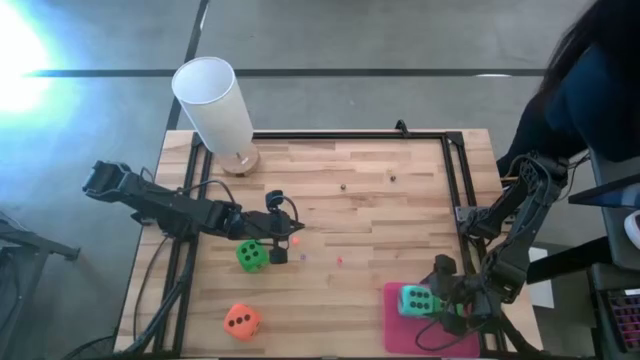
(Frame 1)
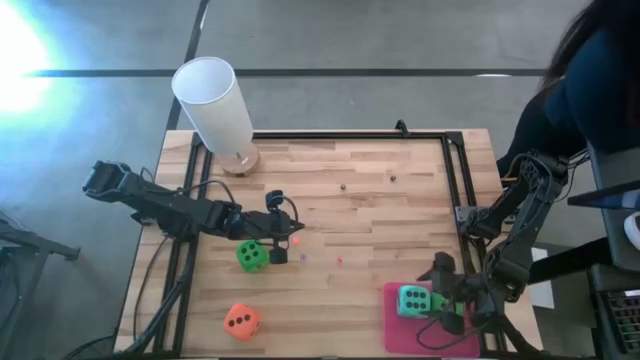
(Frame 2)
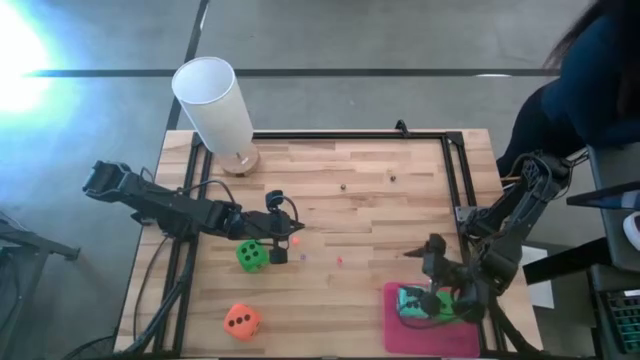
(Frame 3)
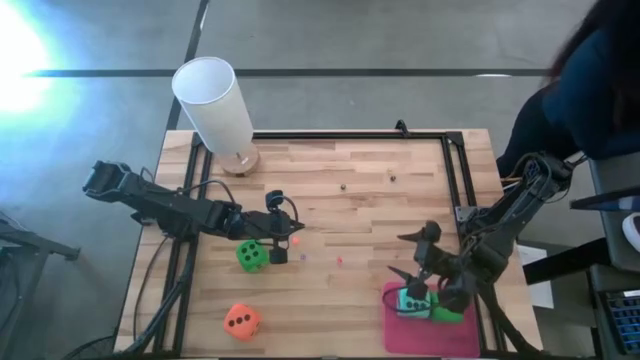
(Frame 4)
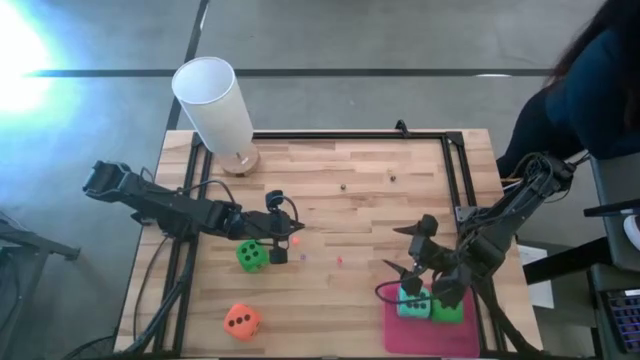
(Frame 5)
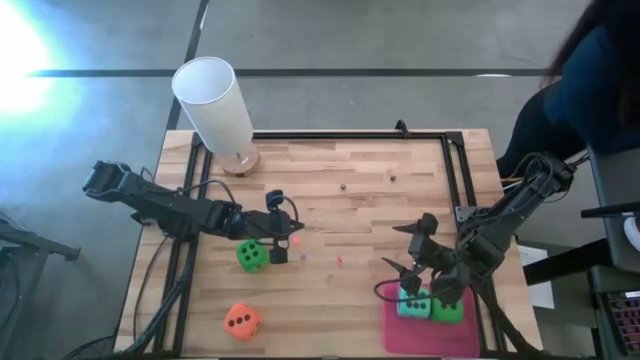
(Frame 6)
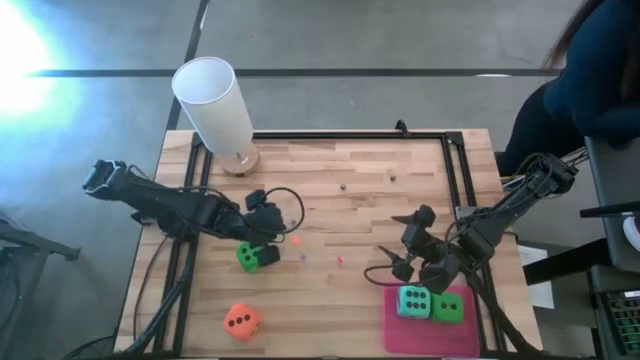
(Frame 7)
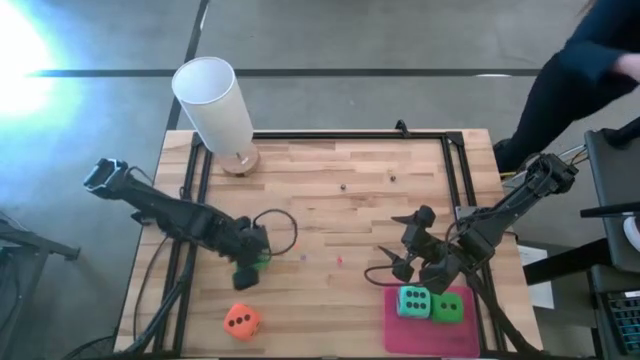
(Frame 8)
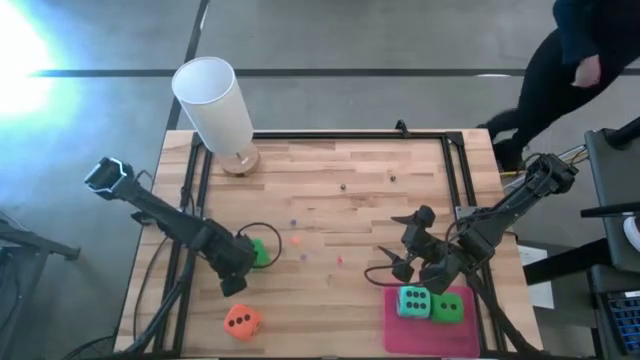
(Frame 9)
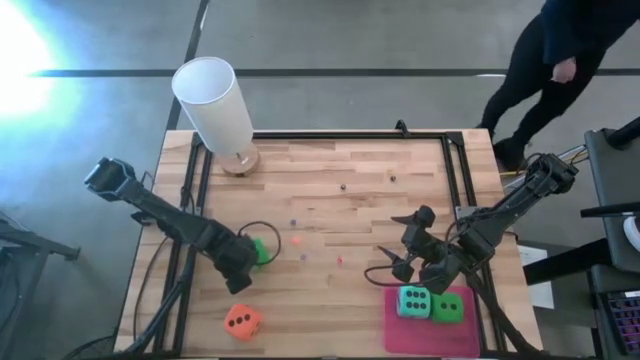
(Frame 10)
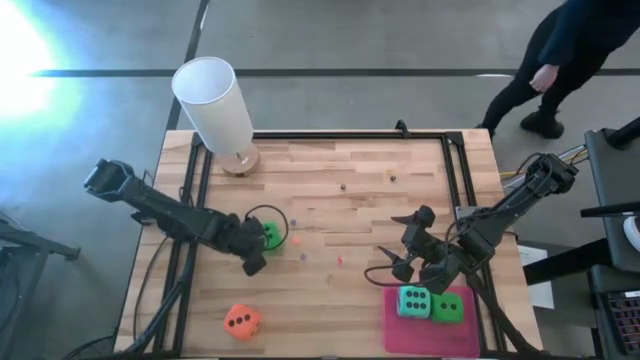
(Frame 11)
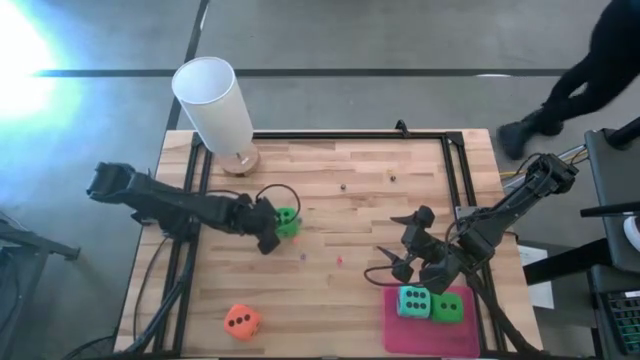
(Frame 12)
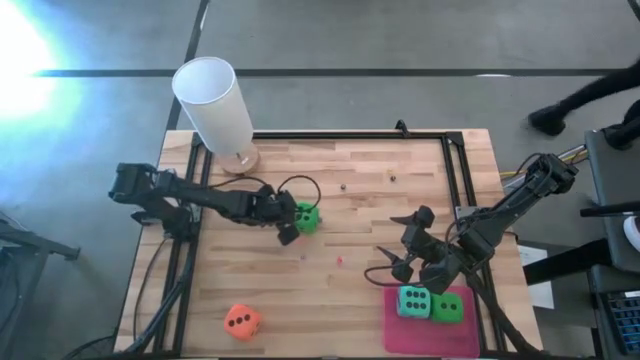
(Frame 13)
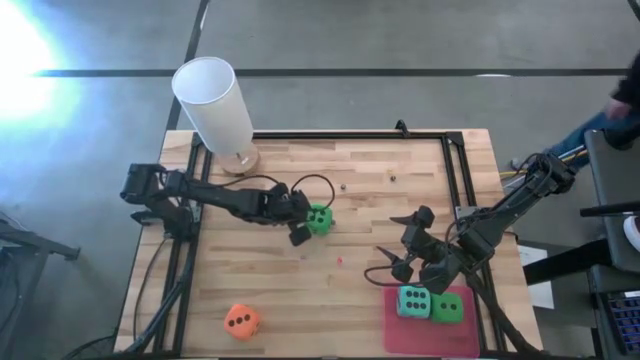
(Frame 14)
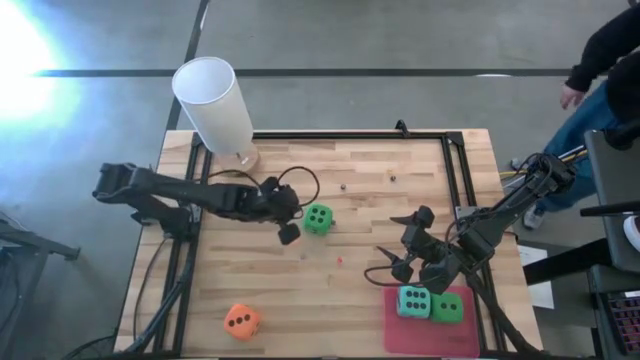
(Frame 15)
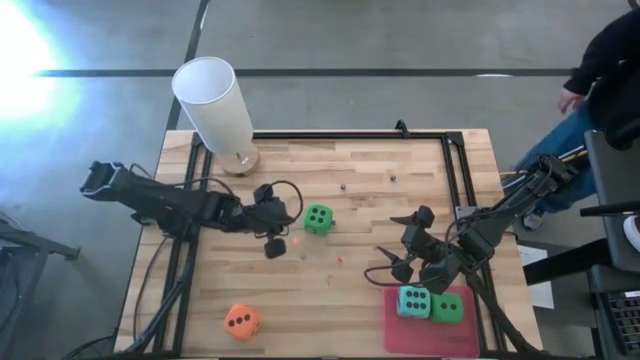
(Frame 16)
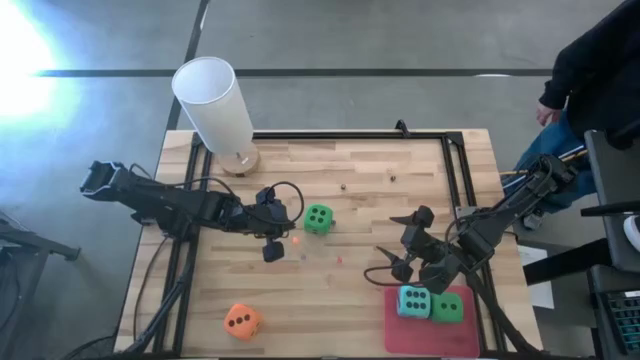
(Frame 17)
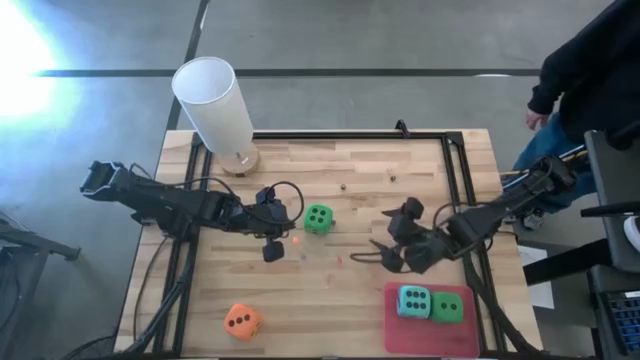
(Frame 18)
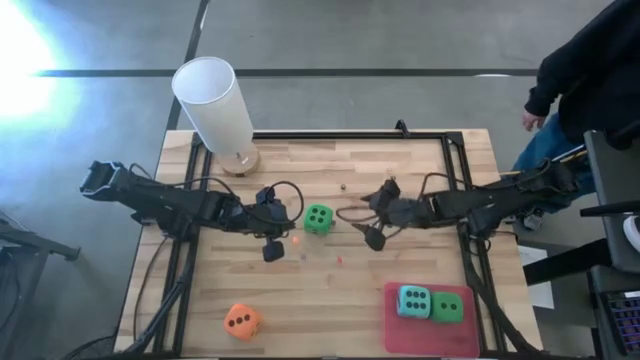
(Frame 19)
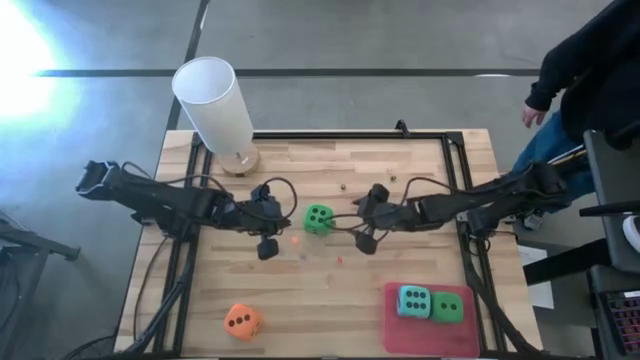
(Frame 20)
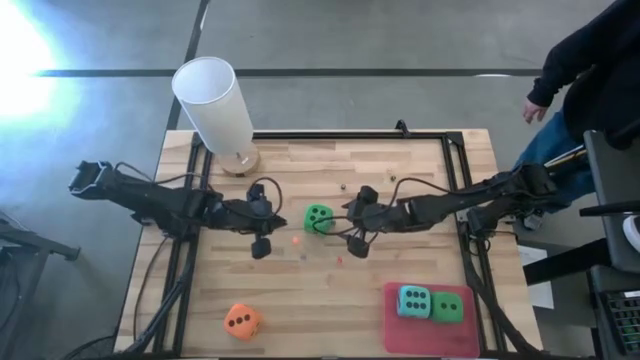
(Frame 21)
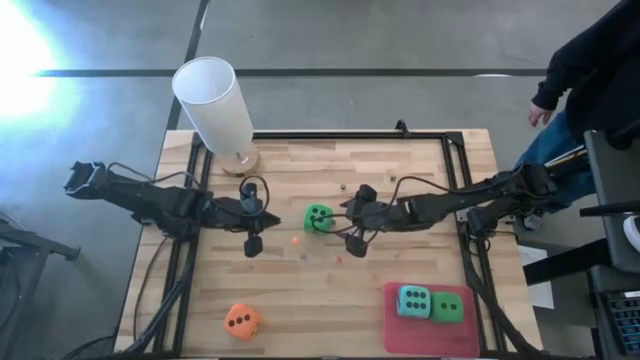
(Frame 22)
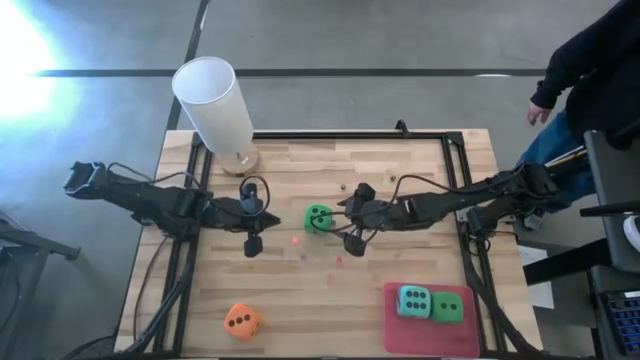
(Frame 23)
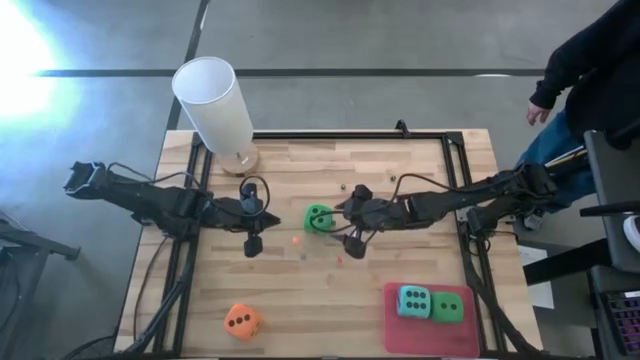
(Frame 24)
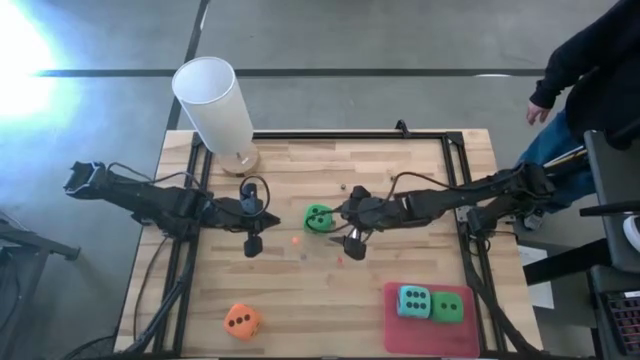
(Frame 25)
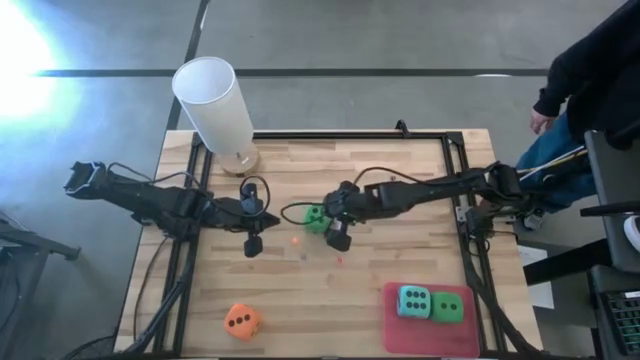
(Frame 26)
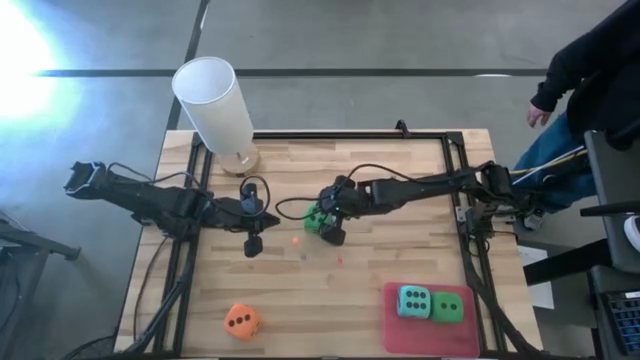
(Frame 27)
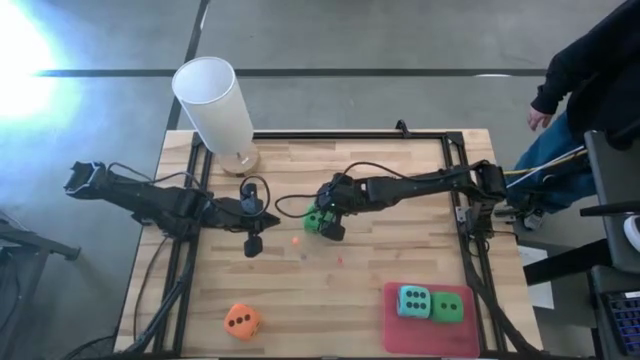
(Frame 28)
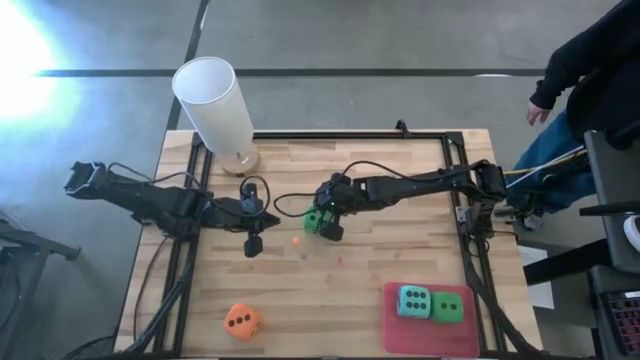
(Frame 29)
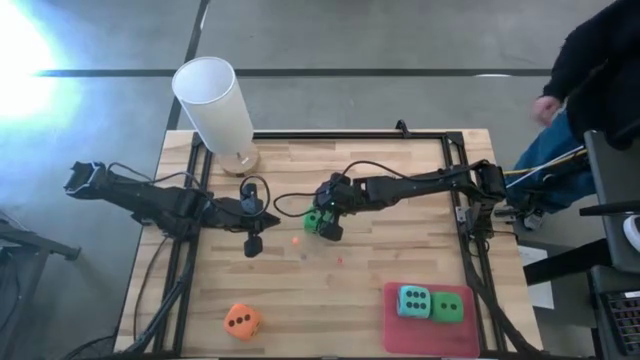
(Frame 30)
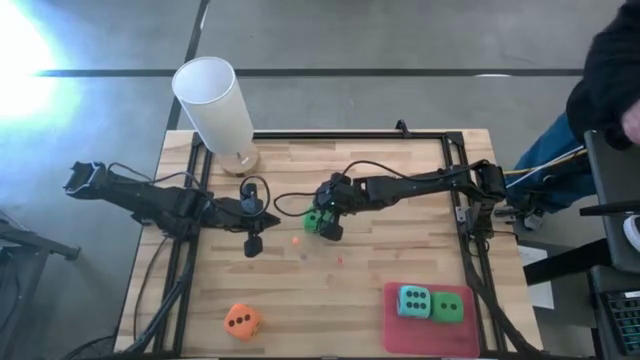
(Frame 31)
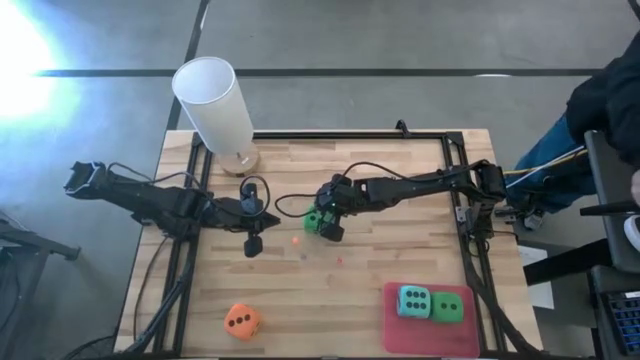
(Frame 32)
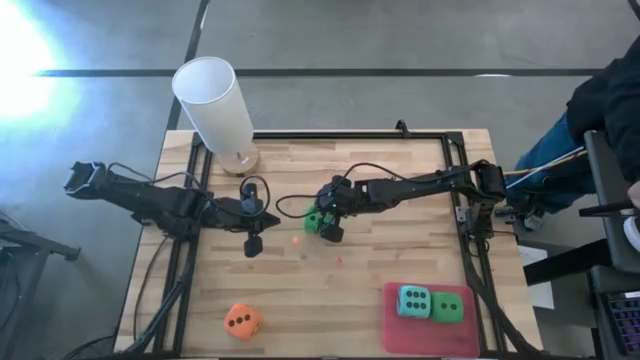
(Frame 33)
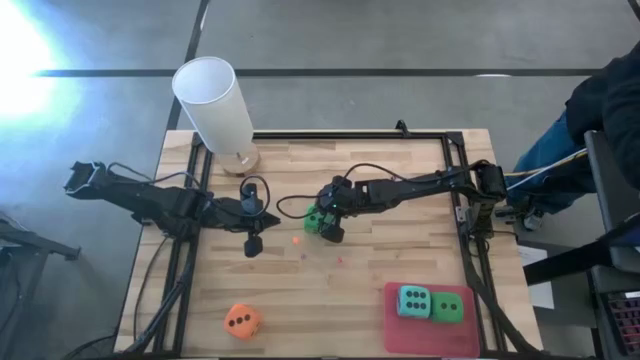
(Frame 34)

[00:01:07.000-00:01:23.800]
Task: Pick & Place Dice
Put the large green die into the bin

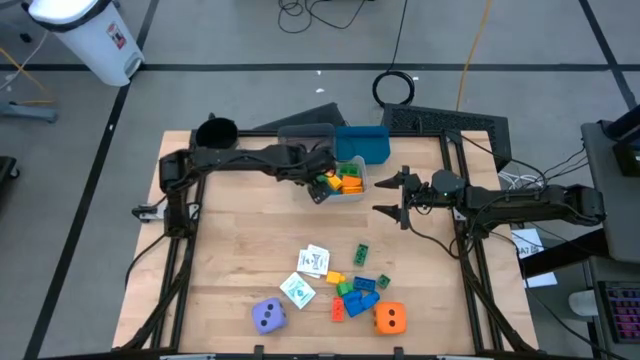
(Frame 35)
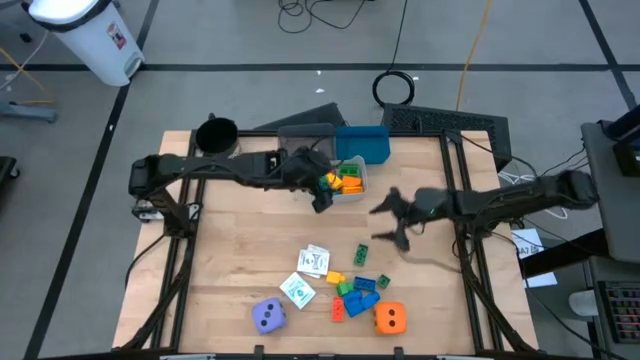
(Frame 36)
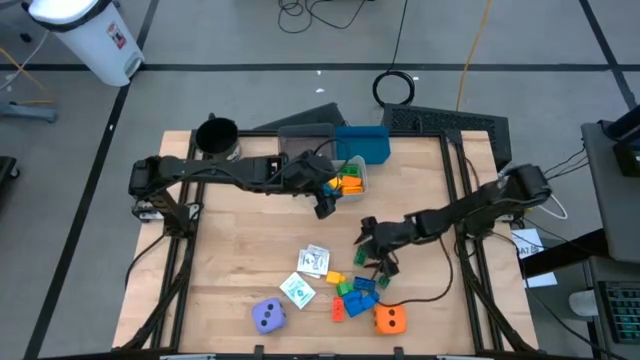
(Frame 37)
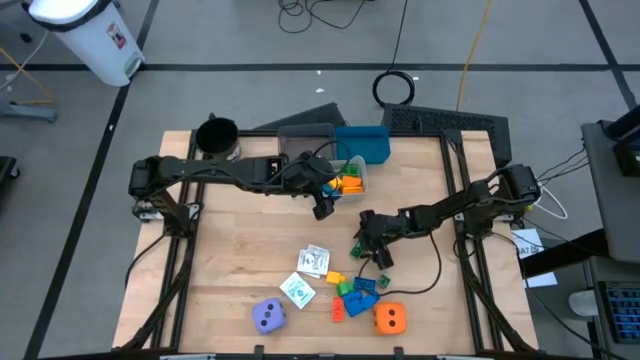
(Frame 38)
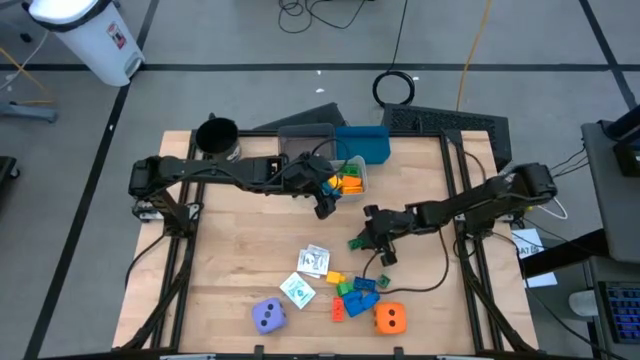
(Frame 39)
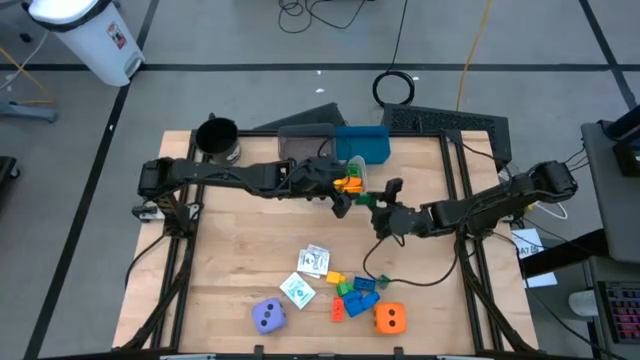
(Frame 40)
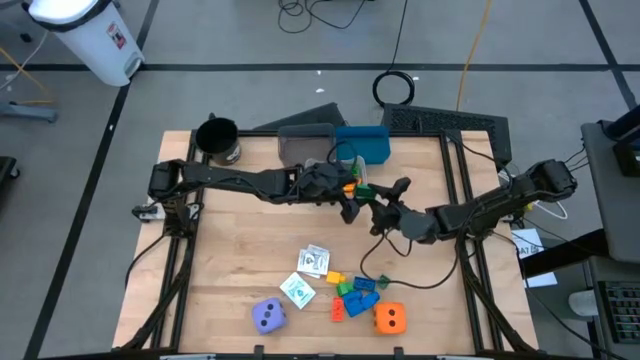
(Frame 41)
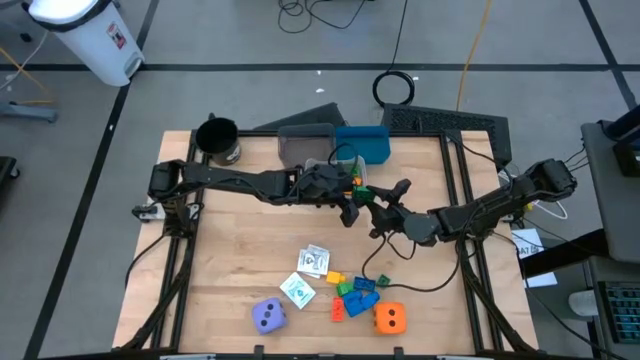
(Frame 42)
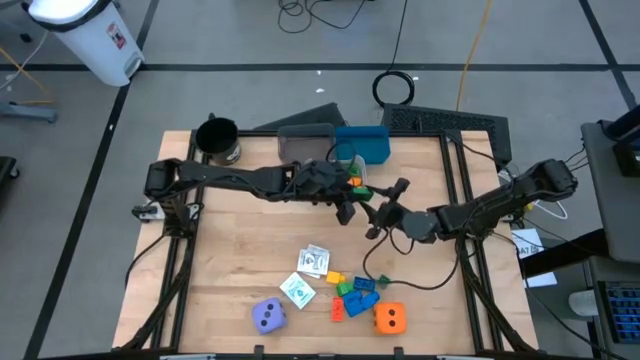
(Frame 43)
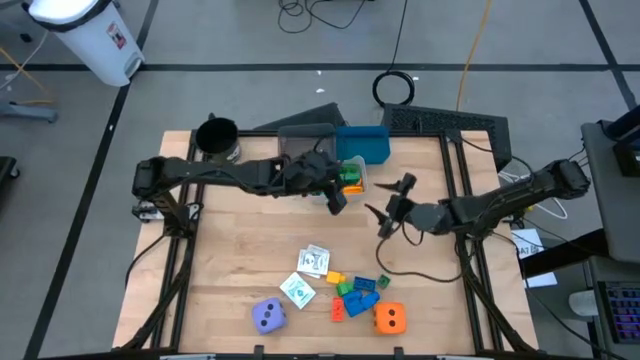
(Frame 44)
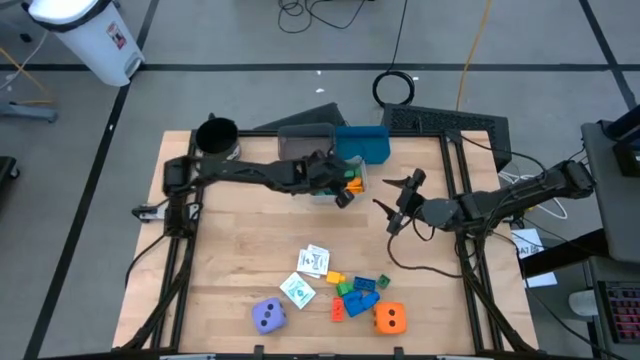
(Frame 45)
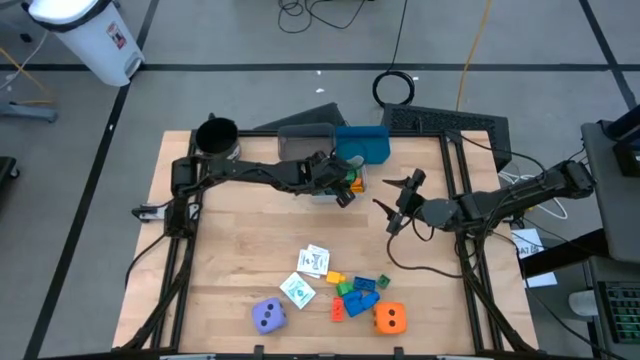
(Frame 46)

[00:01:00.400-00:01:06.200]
Task: Pick & Place Toys
Put the dark green game piece into the gray bin
